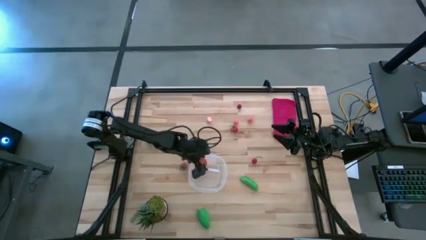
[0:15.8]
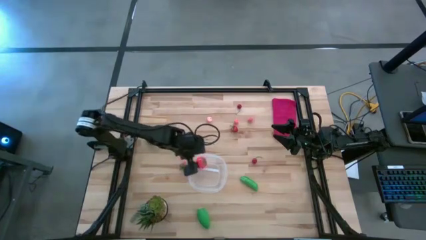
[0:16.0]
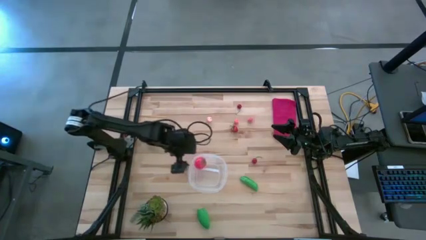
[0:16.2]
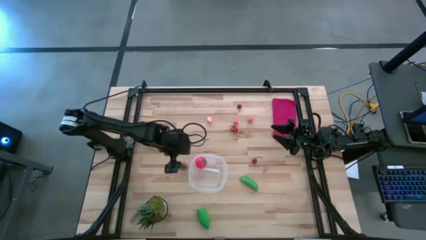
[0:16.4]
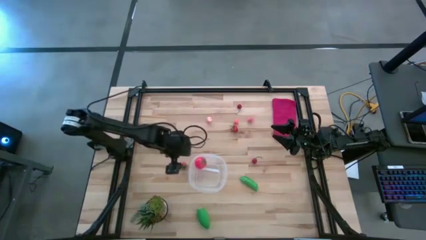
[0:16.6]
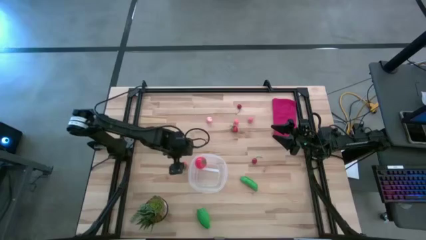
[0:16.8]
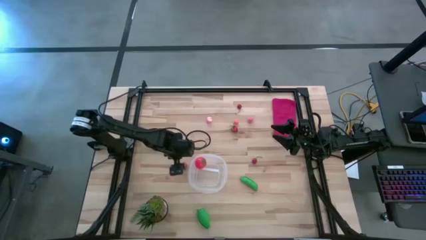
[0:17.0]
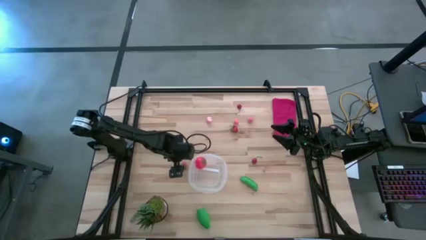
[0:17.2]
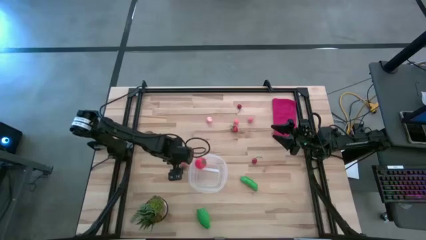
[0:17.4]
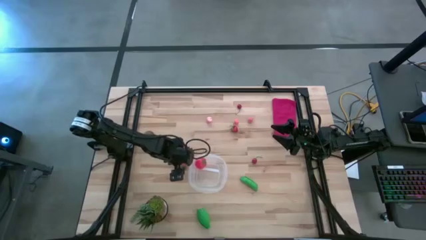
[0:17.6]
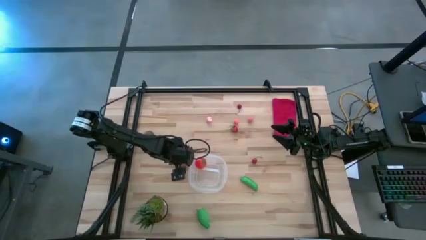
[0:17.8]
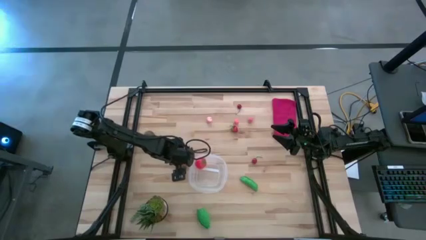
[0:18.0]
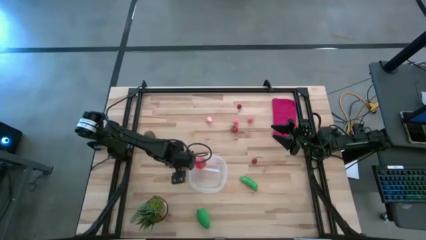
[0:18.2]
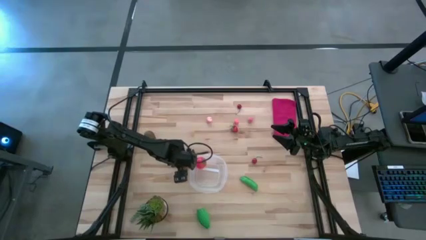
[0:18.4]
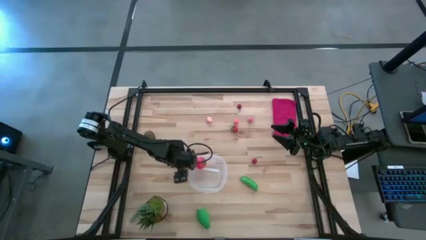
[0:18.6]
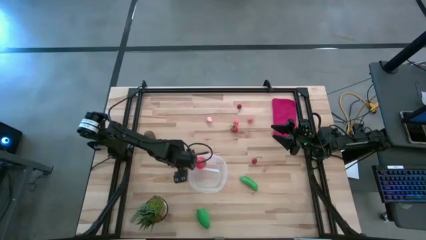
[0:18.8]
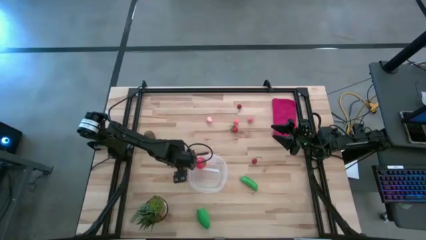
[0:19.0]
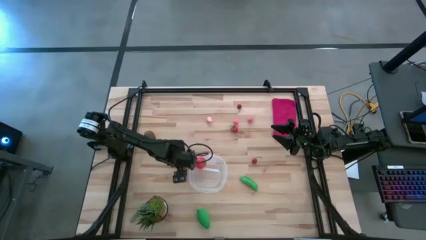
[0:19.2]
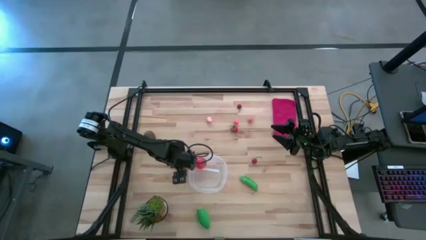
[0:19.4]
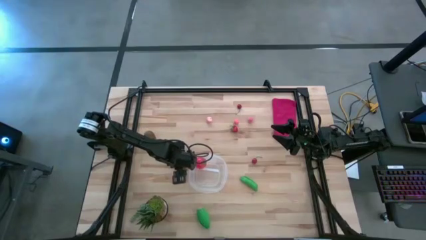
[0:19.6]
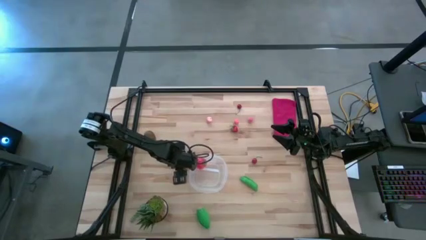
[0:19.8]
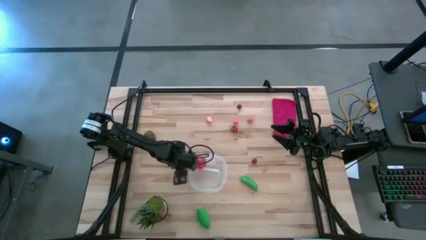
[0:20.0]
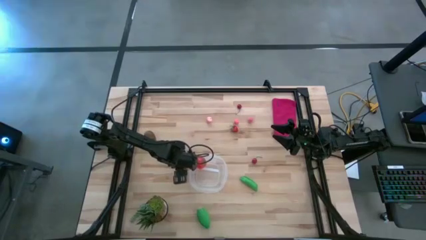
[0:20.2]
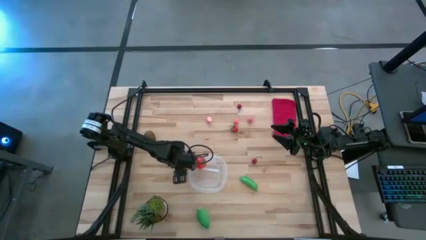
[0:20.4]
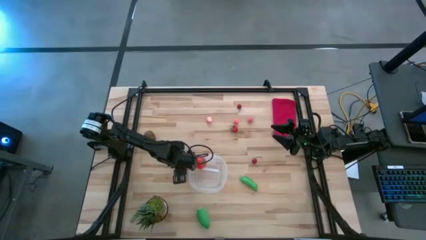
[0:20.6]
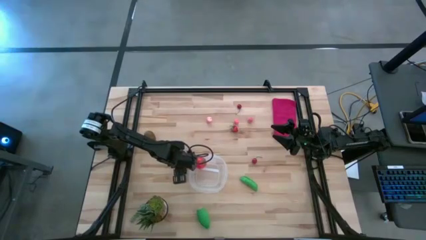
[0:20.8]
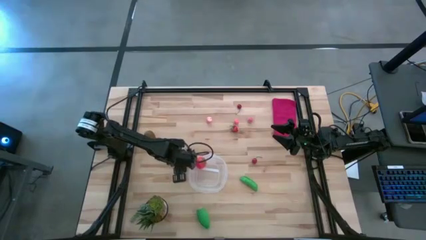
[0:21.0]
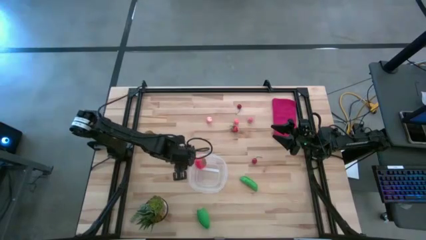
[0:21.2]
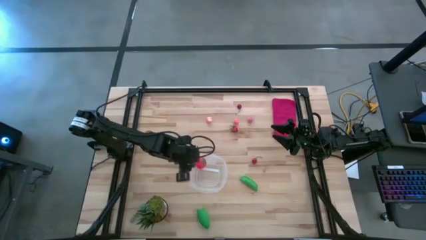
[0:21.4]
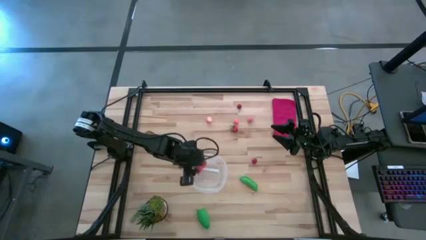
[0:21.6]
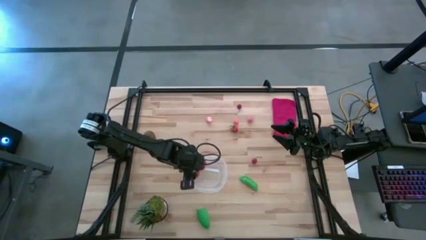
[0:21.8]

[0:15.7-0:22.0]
Task: Pick and placing Produce into tupperware
Put the red strawberry into the bin

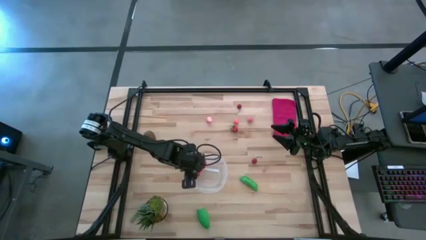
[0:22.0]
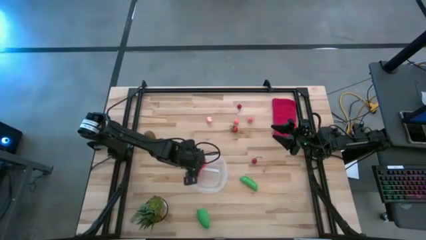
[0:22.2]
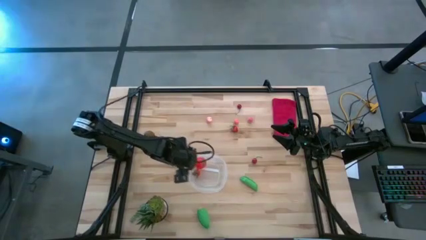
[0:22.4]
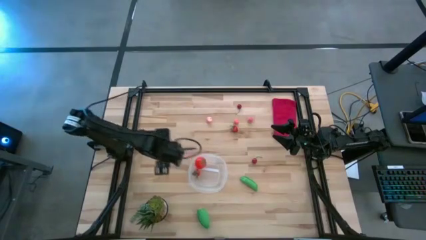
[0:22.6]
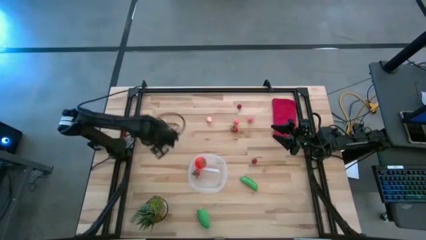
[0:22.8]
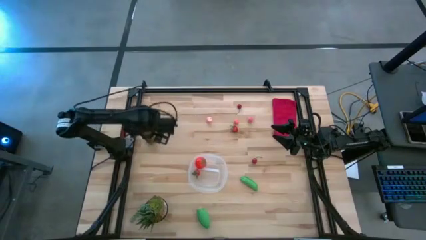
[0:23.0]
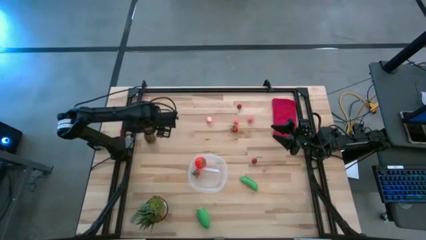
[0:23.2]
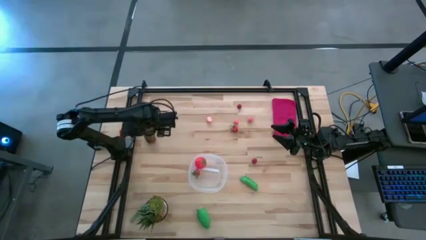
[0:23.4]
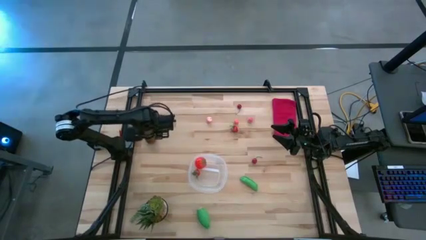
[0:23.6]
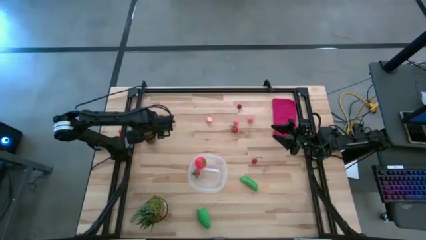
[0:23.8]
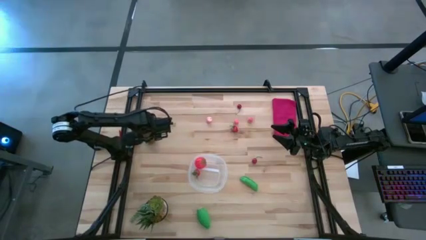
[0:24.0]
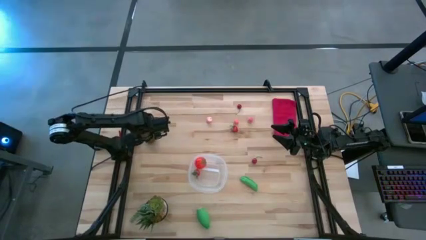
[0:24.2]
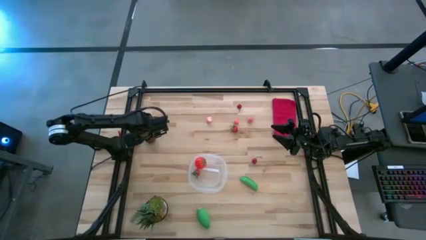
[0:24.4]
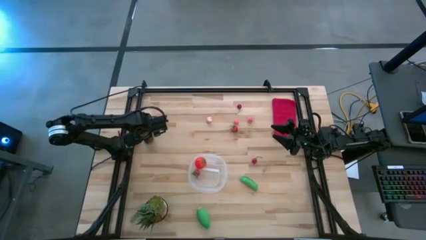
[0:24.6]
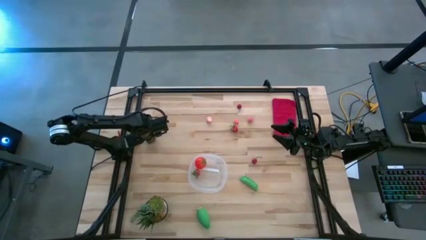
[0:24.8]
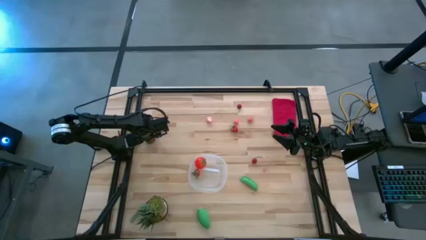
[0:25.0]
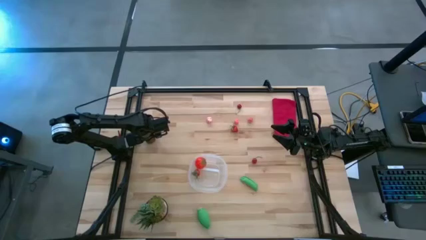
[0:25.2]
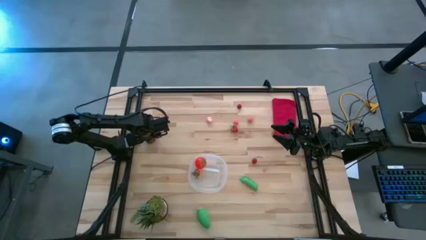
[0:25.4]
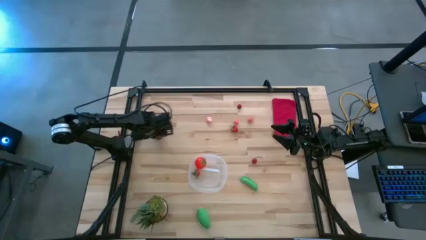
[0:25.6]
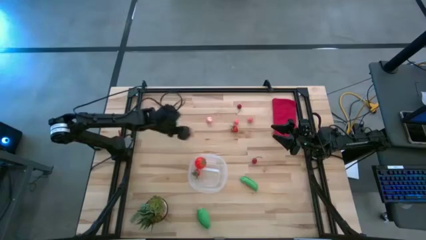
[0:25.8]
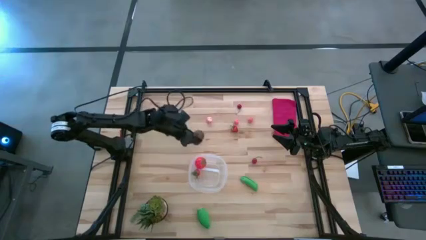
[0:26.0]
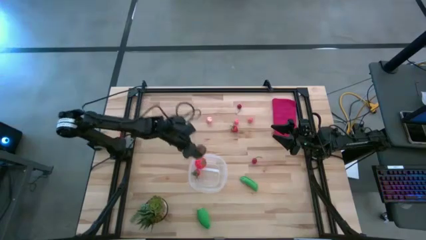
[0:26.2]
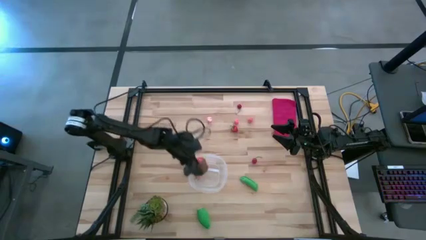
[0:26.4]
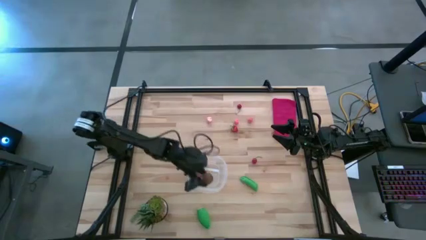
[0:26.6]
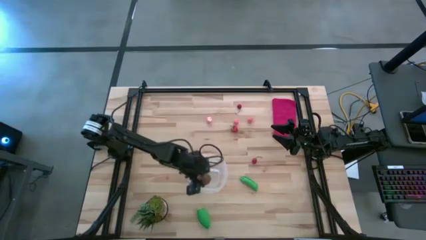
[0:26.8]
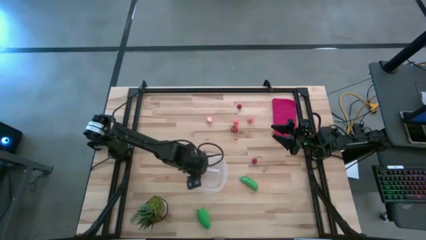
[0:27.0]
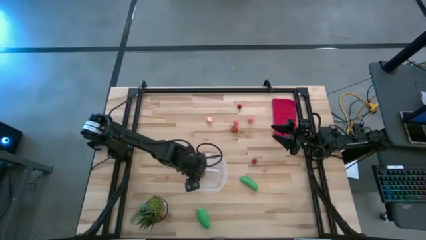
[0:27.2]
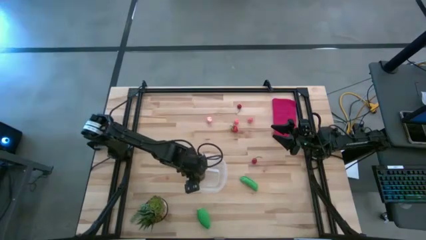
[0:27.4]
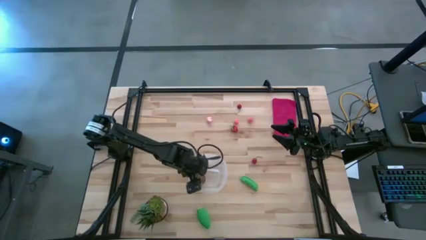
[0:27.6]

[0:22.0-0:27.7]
Put the kiwi into the bin

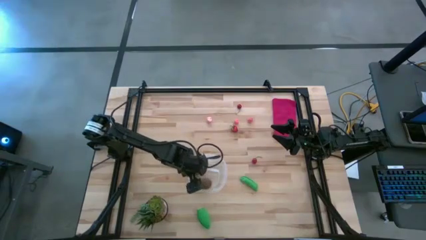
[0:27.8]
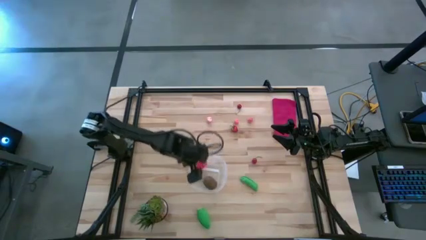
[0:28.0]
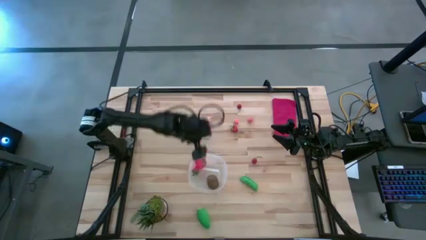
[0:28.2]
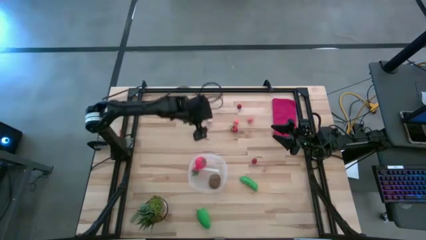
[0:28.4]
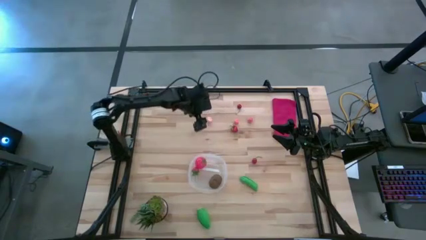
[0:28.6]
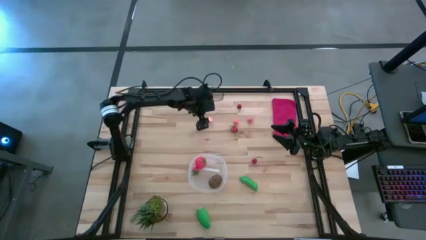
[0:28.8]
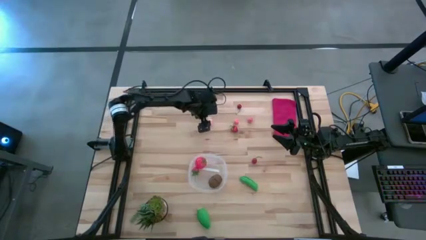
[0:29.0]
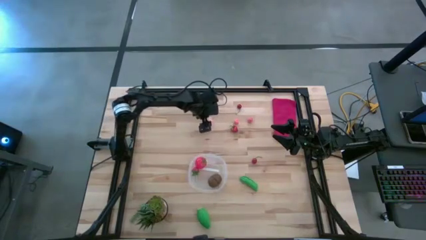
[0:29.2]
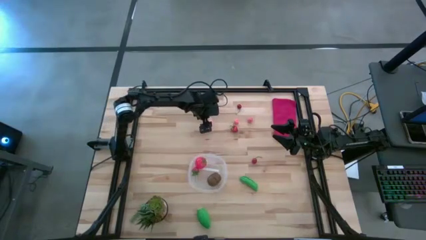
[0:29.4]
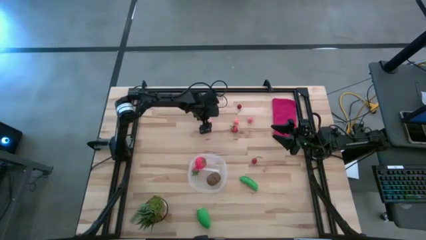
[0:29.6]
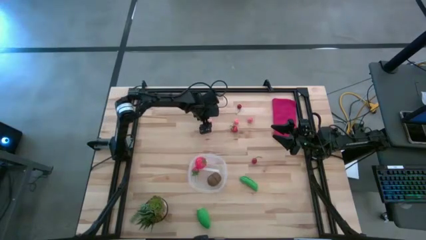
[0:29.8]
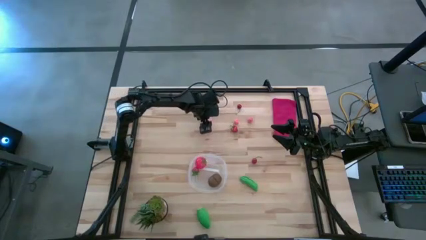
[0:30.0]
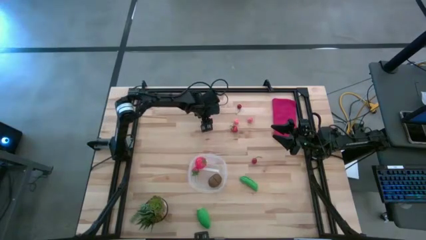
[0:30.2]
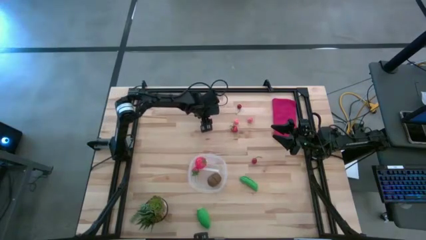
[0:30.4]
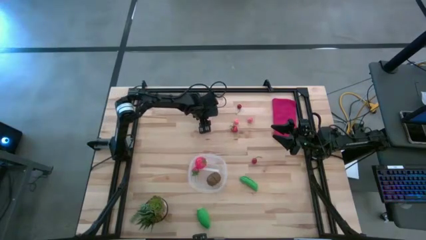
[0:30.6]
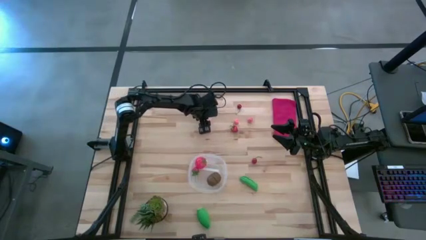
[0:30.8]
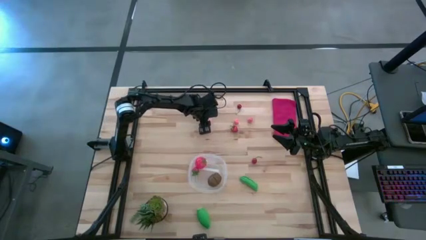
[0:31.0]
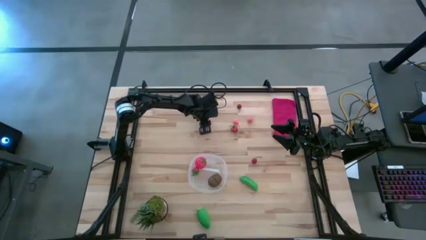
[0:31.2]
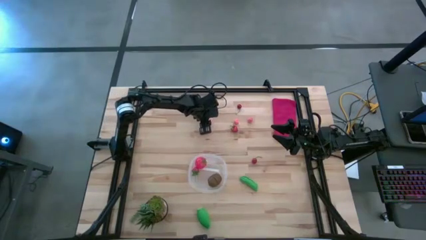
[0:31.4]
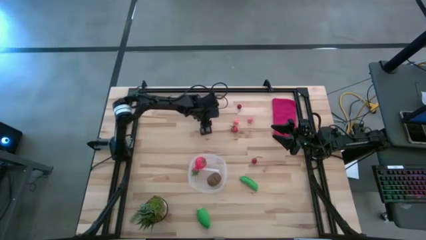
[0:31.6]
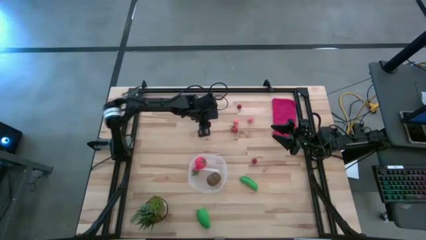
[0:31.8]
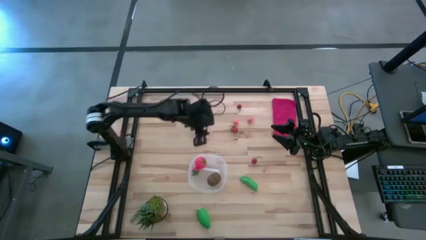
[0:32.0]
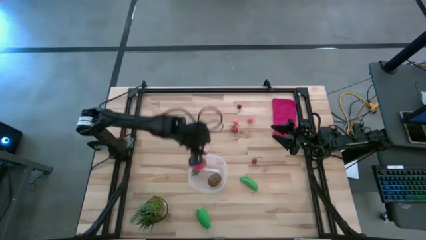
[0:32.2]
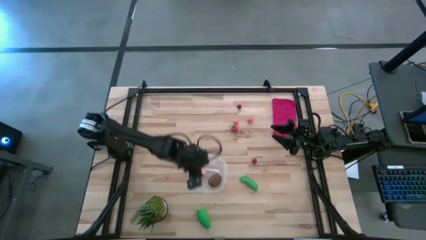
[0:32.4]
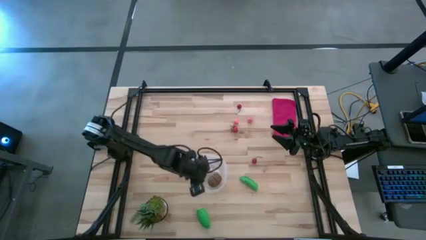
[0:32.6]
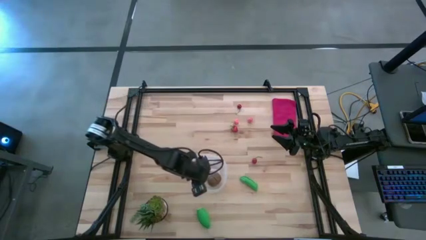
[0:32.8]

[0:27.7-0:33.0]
Put the peach into the bin
